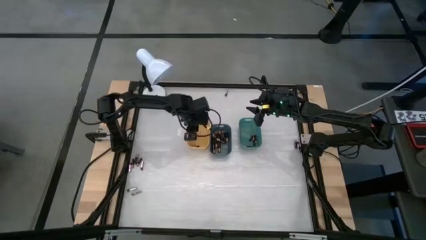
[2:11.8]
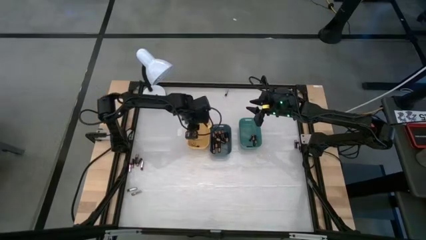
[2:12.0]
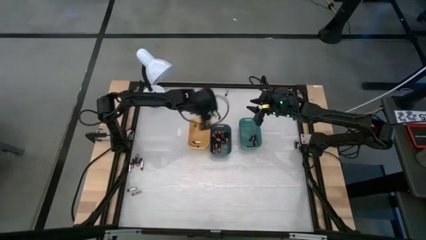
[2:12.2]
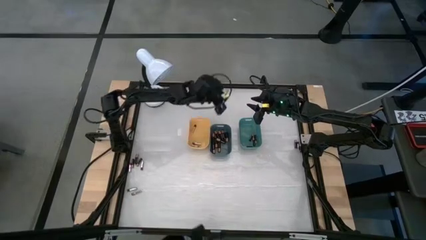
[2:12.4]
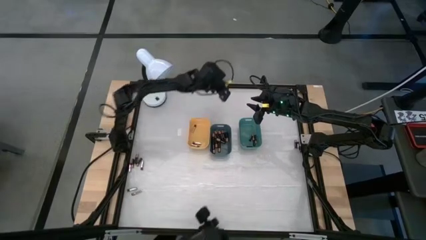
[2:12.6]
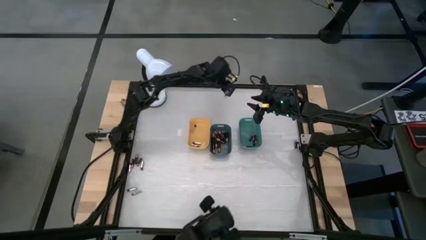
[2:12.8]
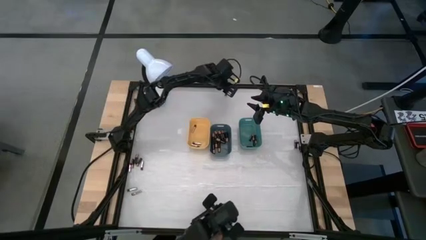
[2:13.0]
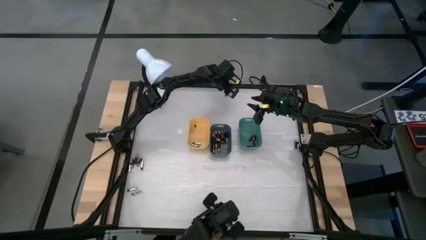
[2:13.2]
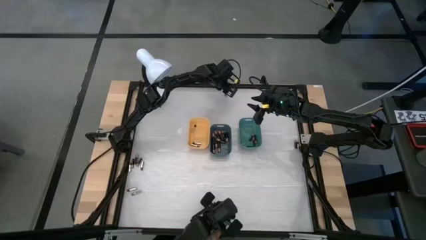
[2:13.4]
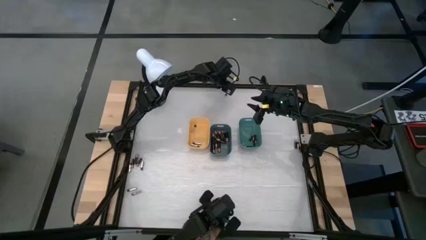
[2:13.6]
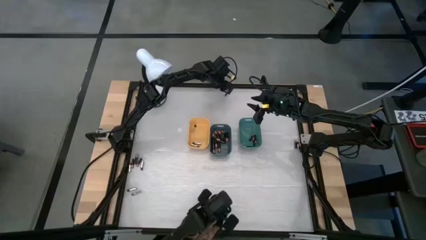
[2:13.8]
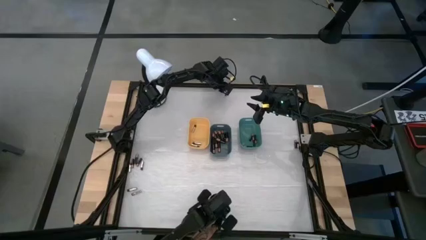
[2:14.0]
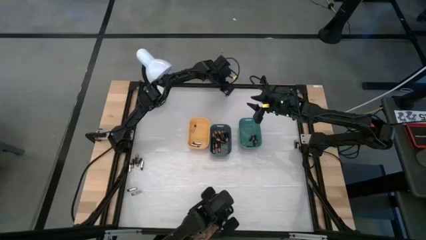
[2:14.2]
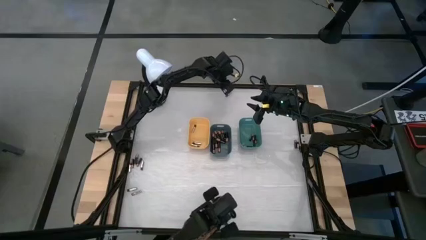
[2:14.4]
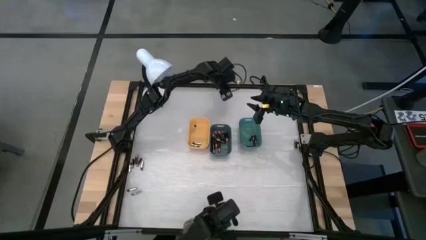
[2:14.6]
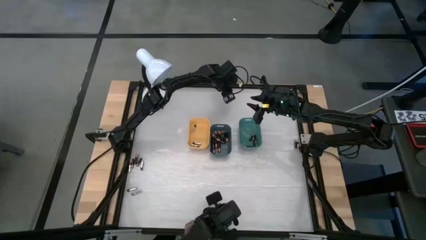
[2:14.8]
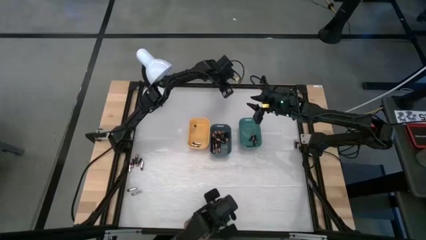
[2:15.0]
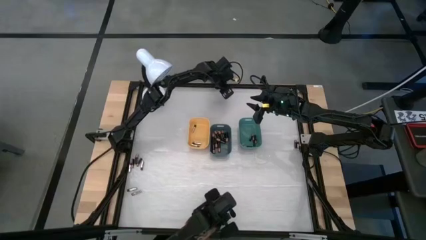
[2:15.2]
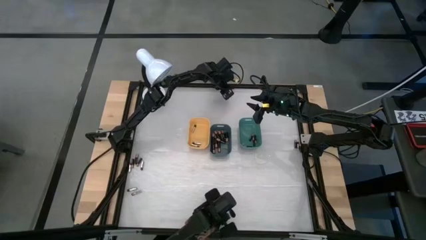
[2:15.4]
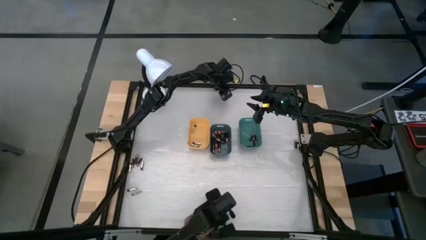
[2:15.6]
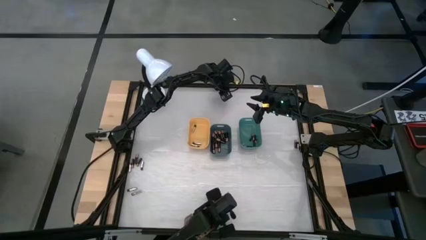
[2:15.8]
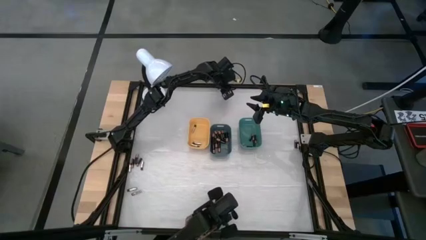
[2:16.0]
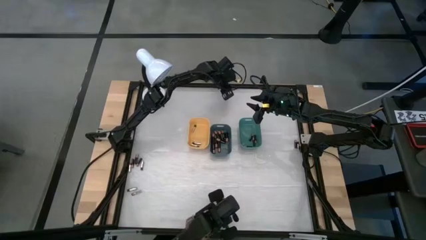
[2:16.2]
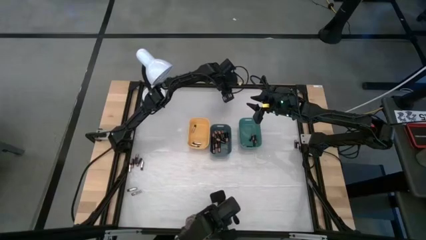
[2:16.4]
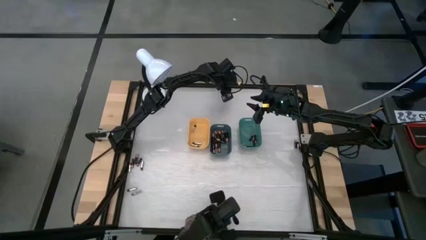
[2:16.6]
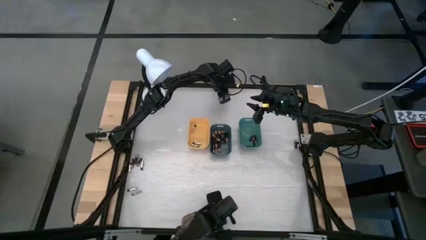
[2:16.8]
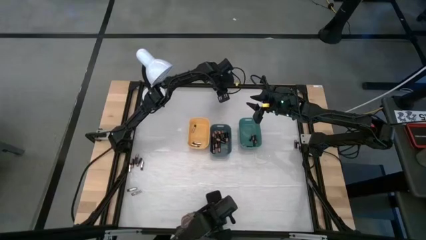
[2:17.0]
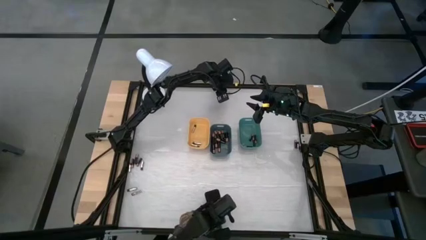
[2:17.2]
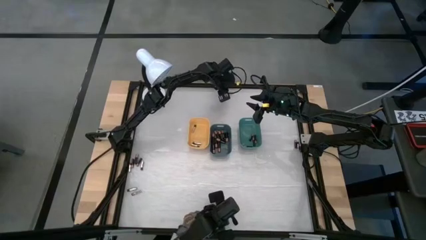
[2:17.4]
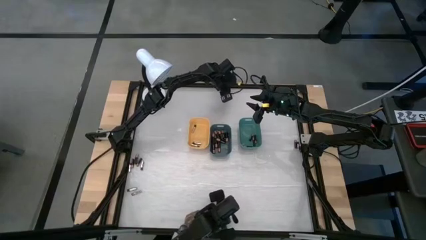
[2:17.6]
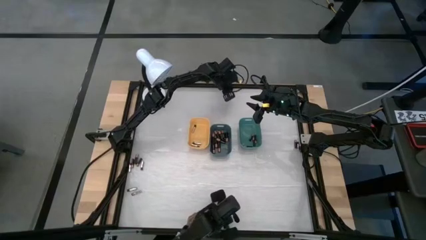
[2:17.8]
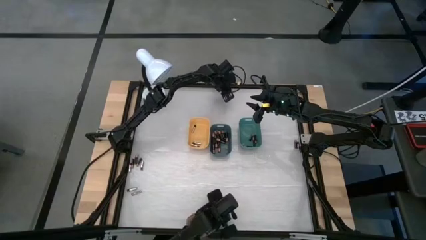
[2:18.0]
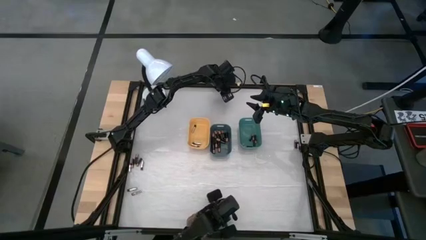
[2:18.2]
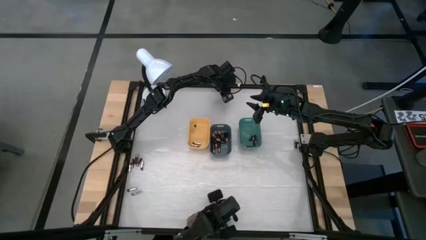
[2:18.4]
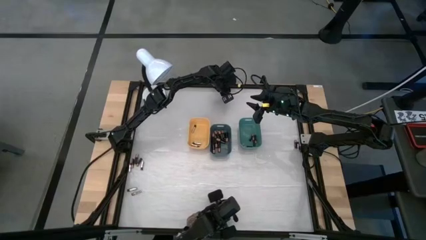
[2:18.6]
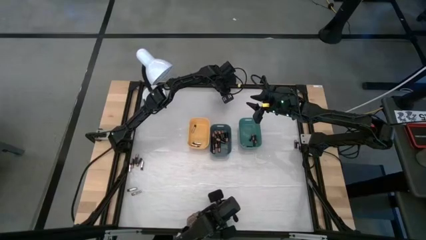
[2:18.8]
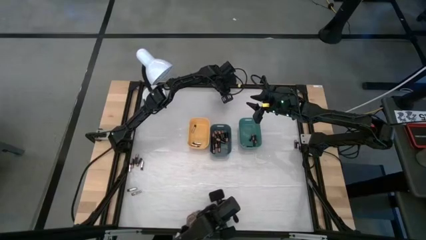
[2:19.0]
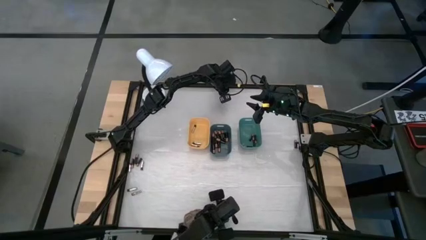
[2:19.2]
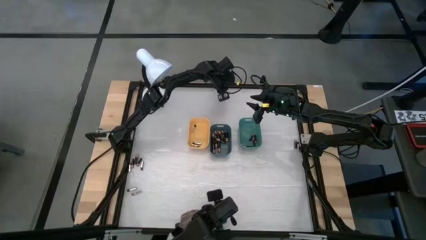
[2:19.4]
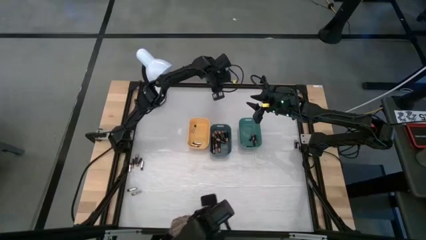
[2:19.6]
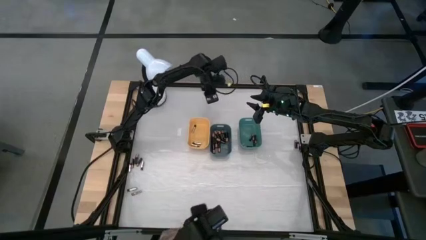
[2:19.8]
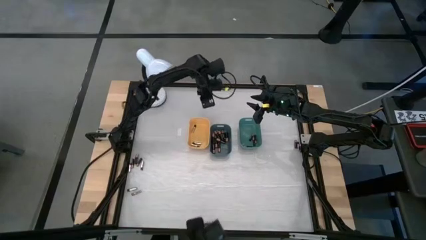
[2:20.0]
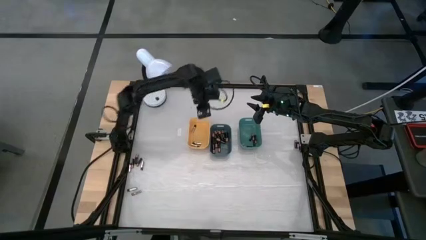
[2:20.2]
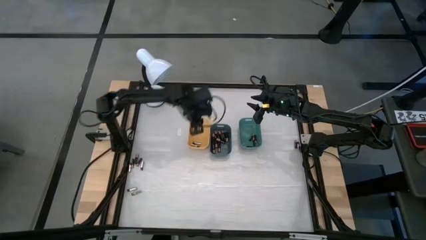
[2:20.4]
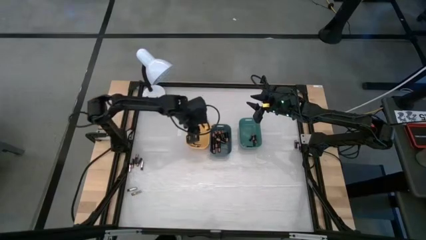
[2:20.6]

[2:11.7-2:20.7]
Task: Sort batteries
Put the silver battery into the yellow bin

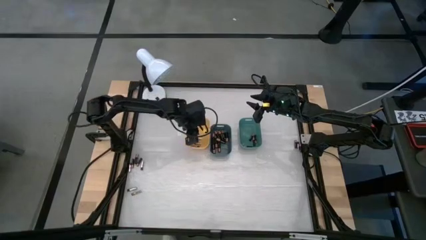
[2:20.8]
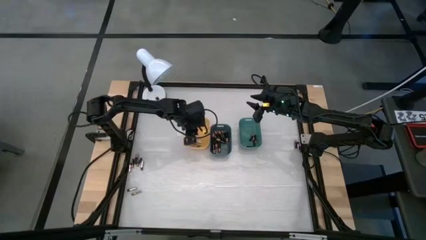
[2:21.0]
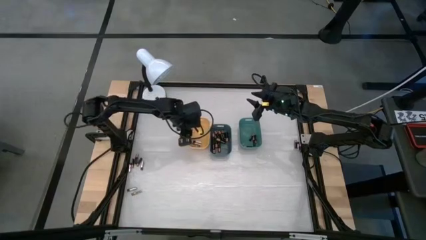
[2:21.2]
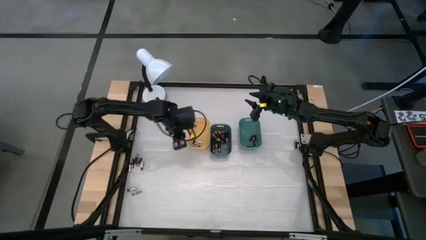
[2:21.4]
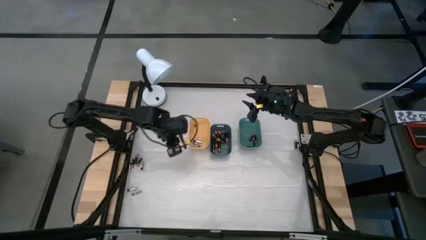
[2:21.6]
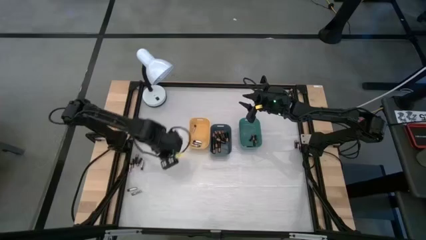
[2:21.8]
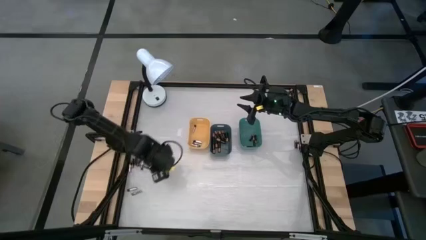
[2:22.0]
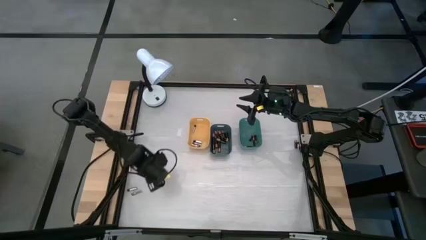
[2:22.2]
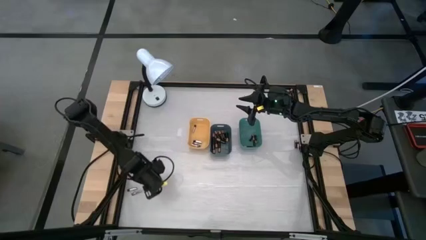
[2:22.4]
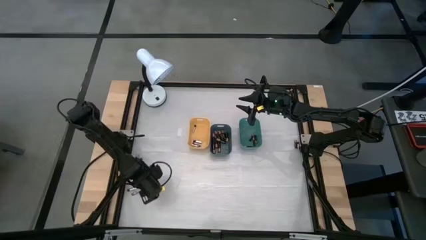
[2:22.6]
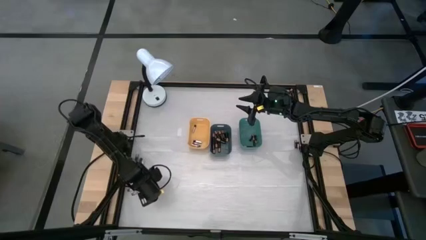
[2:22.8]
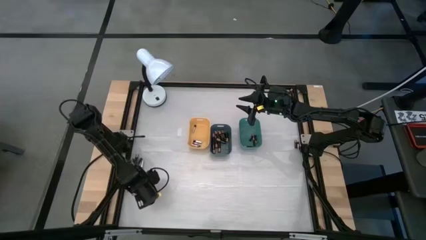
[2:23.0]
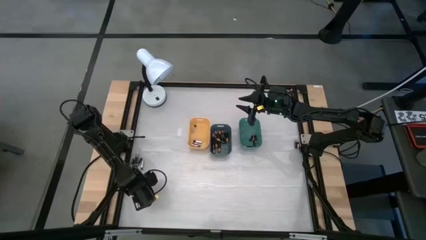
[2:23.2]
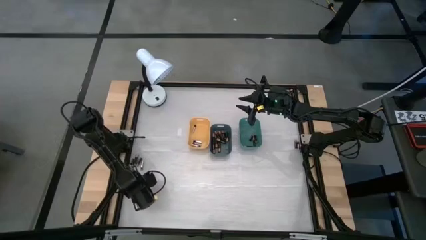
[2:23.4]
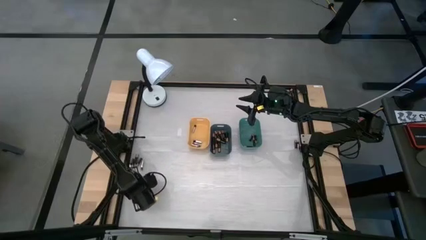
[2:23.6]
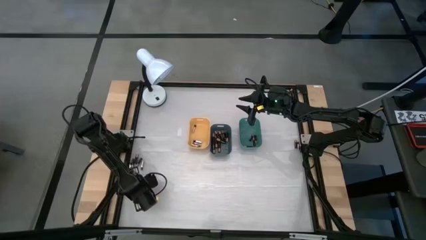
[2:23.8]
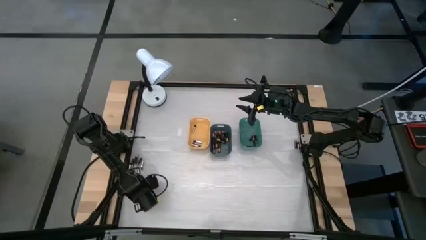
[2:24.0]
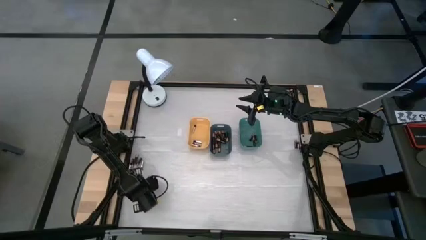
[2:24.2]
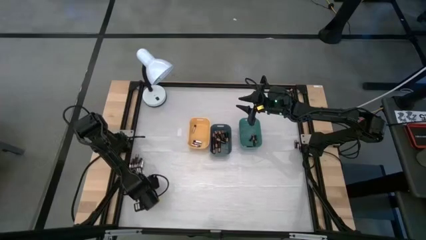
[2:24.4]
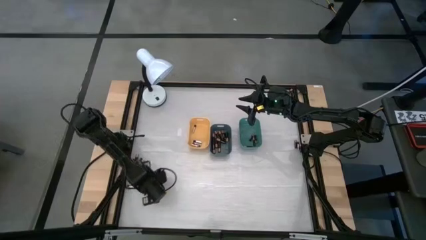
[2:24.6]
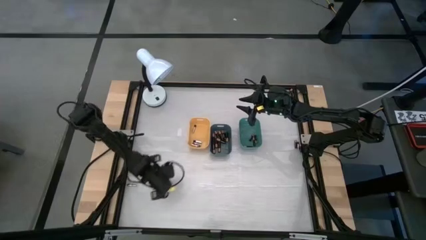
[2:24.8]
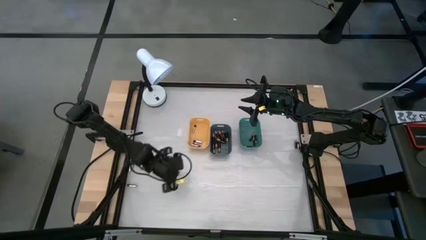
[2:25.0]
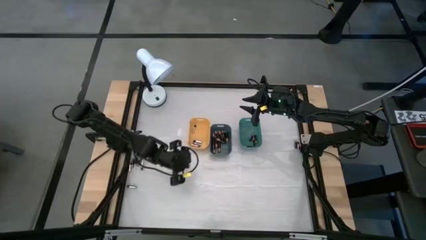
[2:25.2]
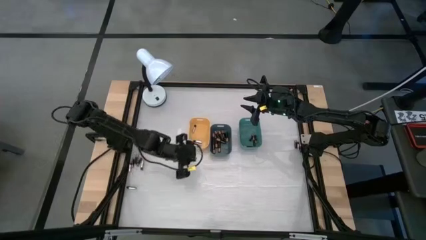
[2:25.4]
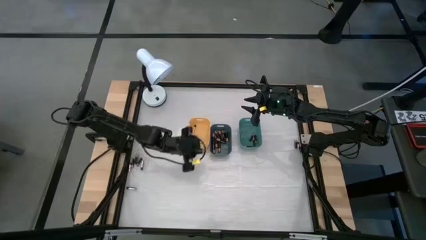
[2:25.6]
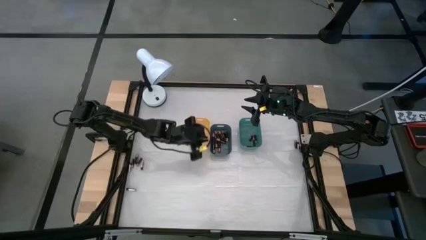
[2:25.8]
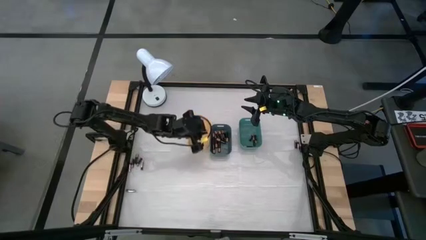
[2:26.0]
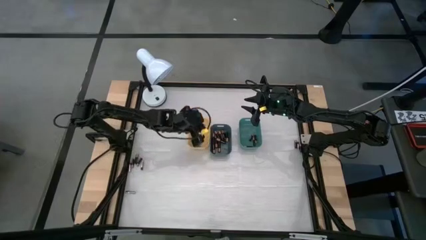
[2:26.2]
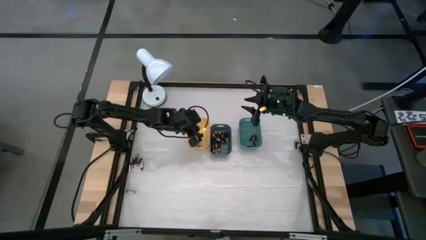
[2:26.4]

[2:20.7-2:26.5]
Put the silver battery into the yellow bin

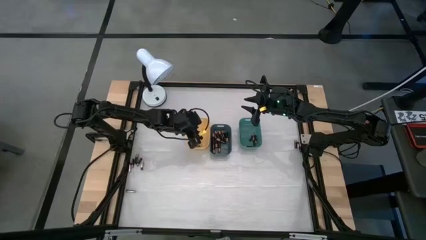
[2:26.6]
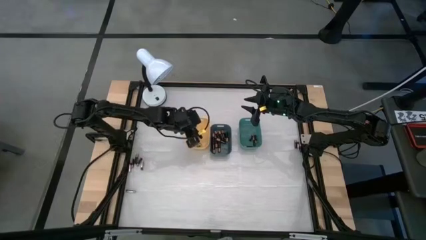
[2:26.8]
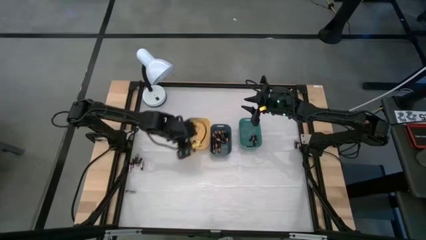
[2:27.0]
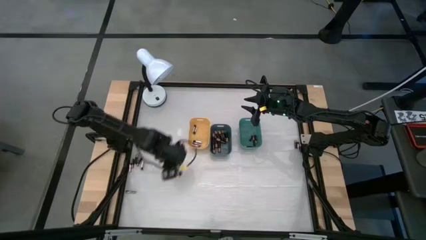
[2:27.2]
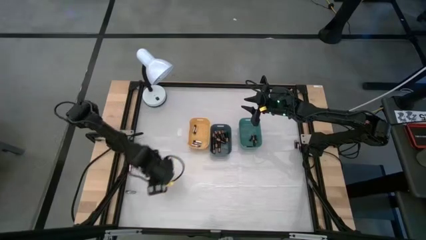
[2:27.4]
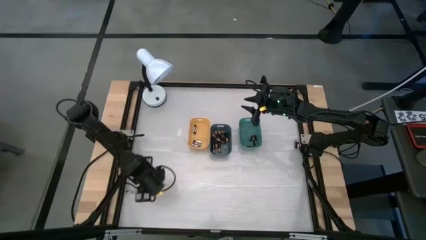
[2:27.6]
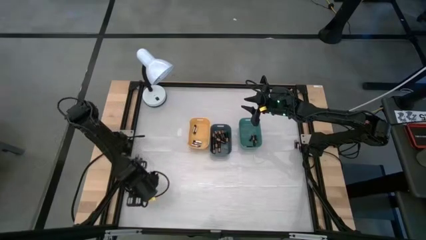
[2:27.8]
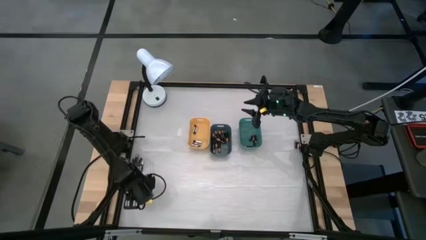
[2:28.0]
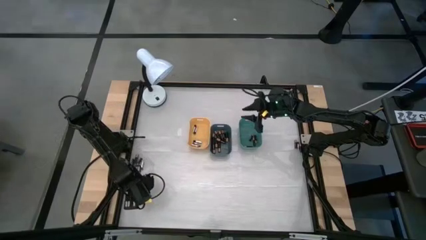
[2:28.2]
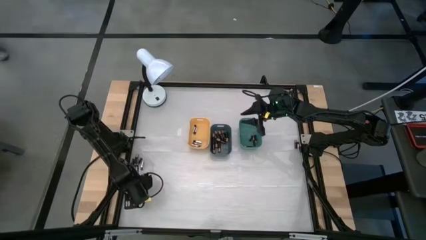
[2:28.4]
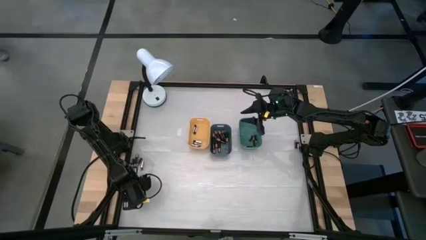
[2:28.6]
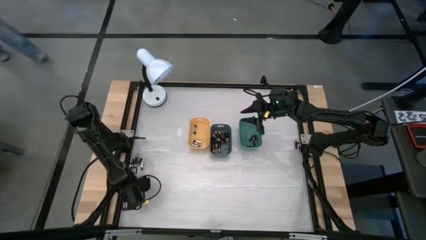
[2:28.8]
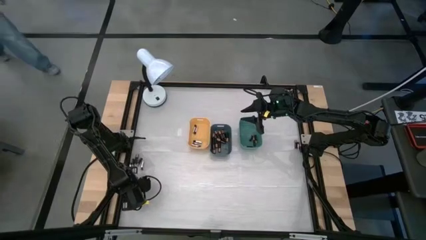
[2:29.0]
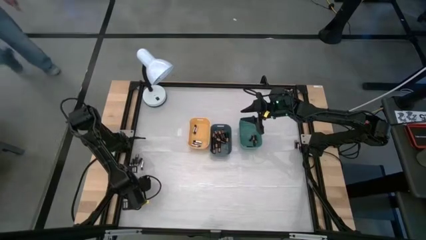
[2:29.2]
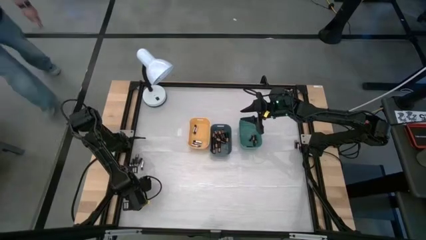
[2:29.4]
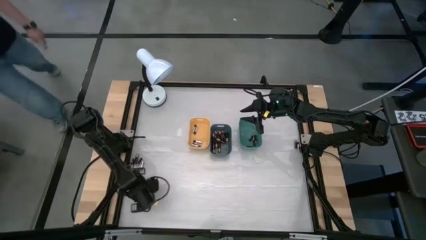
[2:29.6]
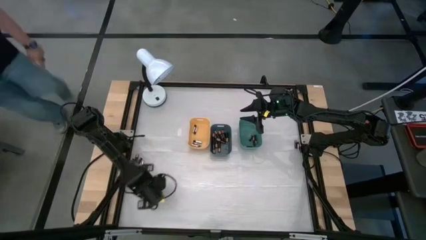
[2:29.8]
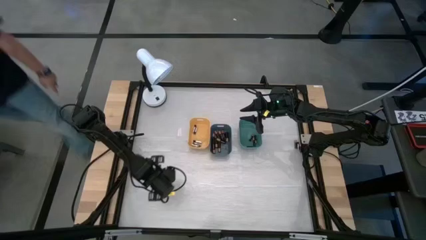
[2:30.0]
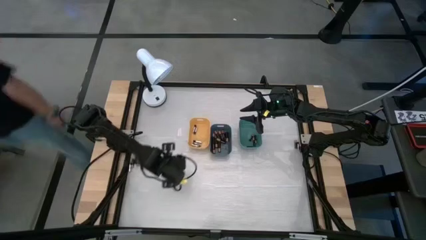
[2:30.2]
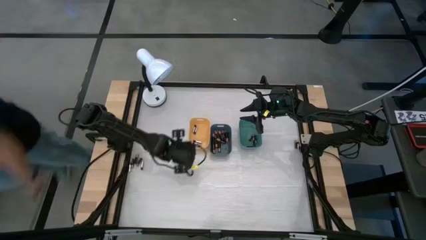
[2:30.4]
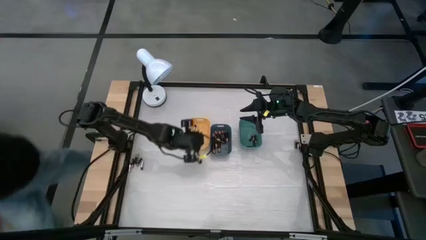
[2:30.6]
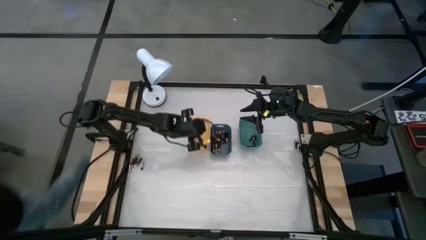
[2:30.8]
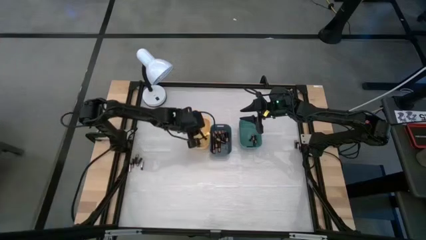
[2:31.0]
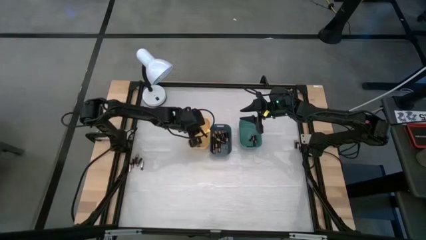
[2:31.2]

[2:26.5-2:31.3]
Put the silver battery into the yellow bin
